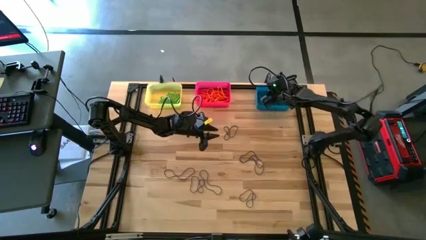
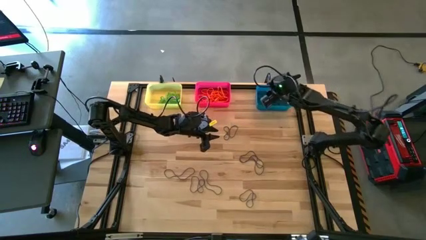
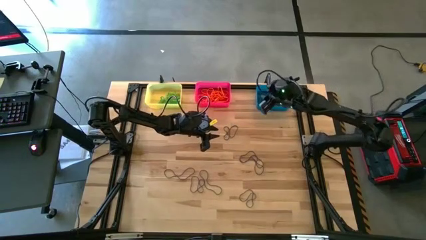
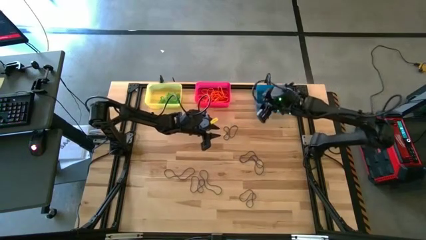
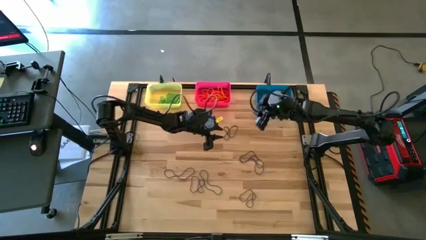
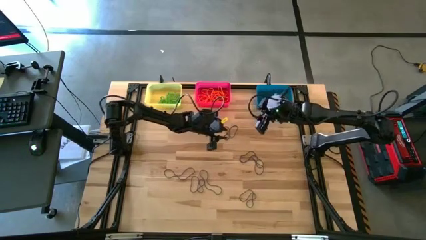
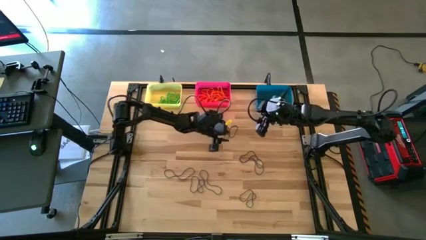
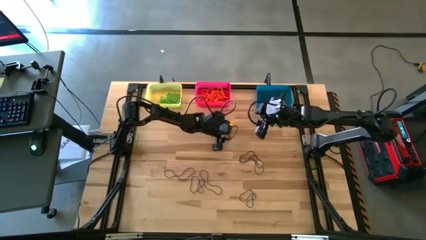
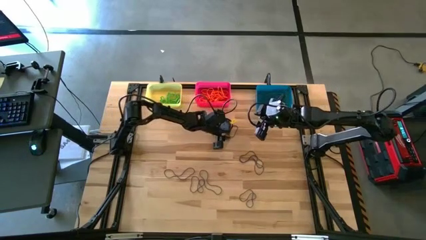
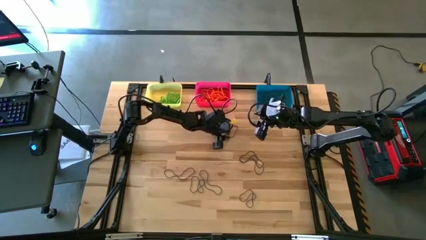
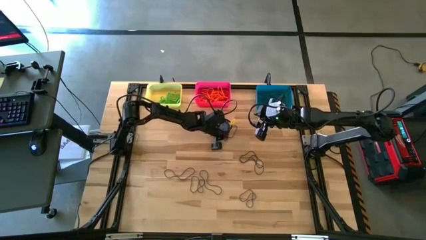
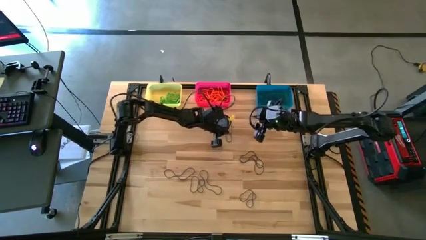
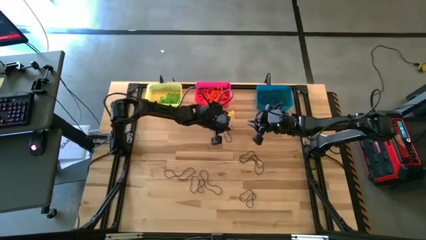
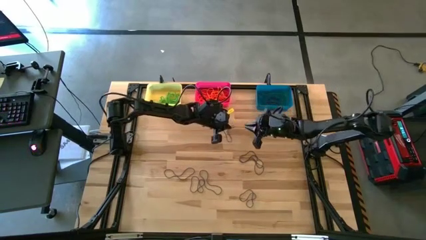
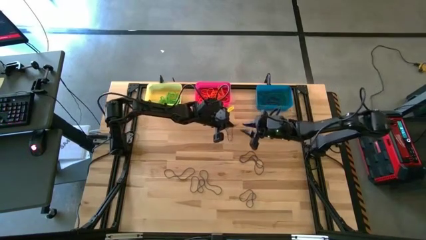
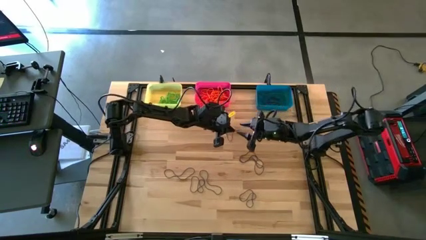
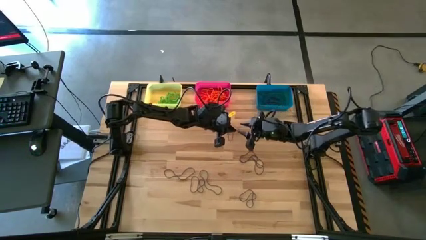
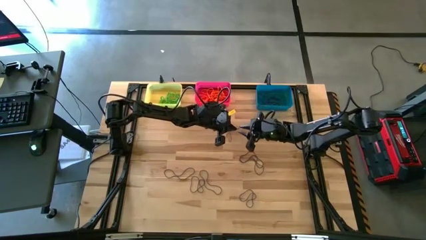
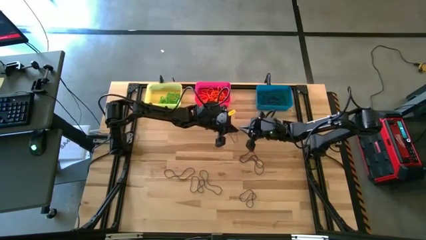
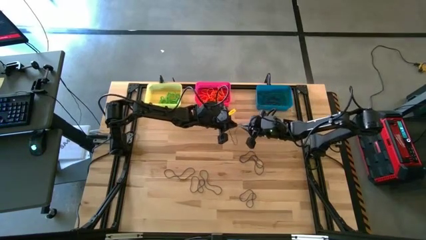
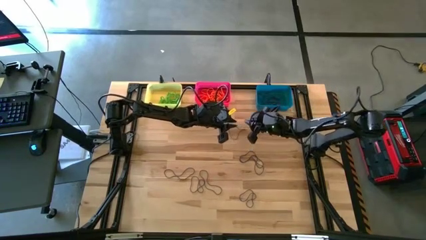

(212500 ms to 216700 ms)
Task: Sort rubber bands into baskets
Put the violet rubber band into the blue bin

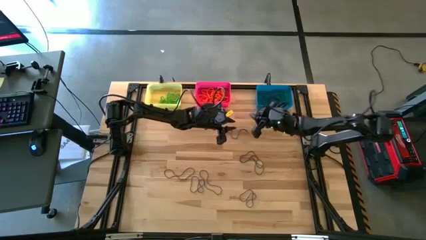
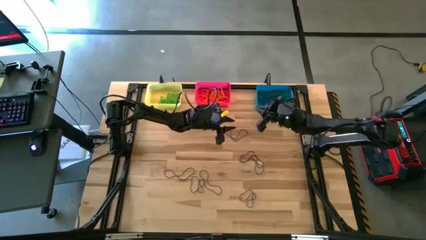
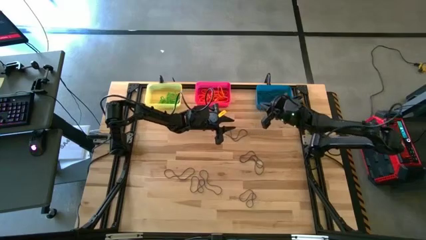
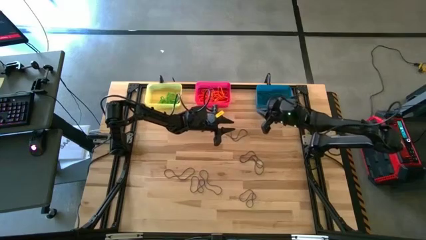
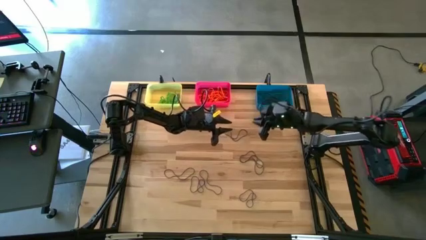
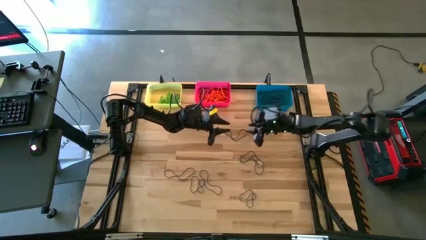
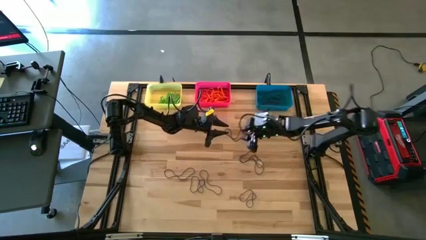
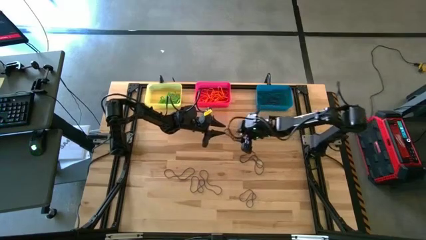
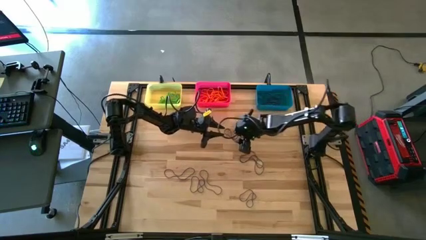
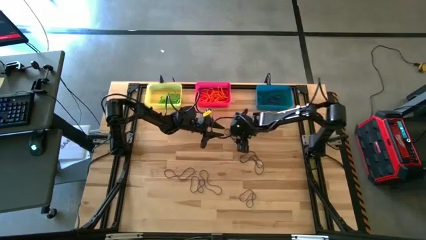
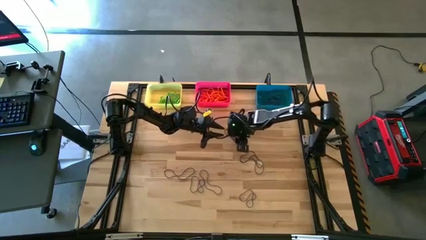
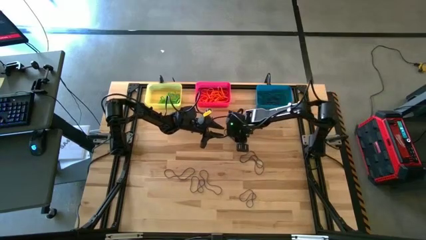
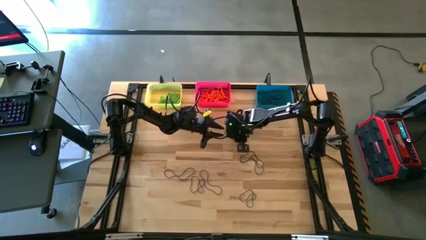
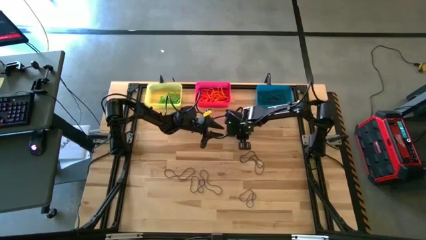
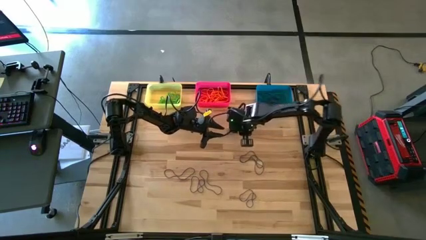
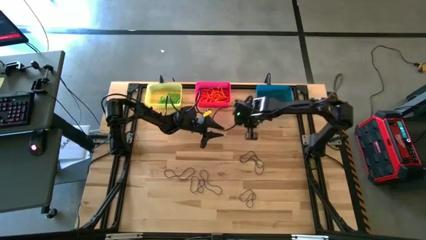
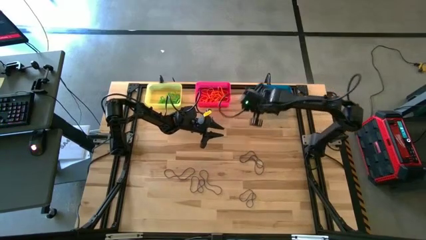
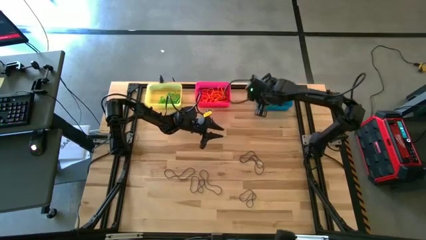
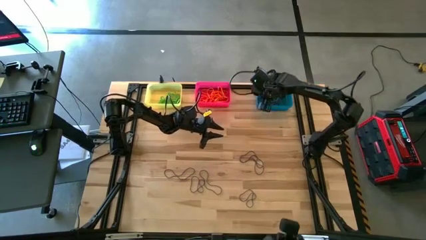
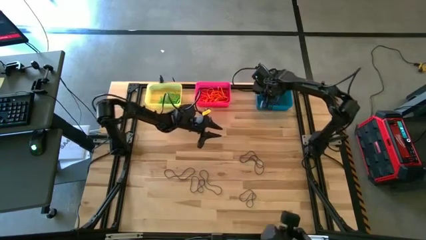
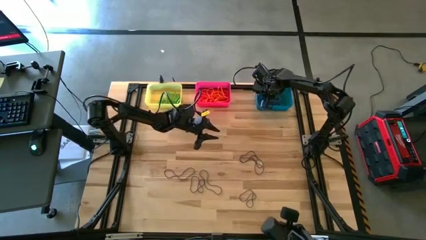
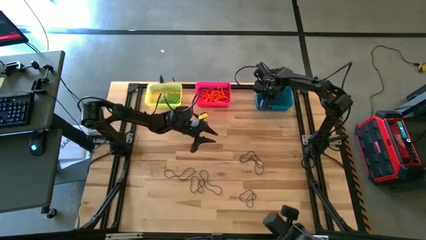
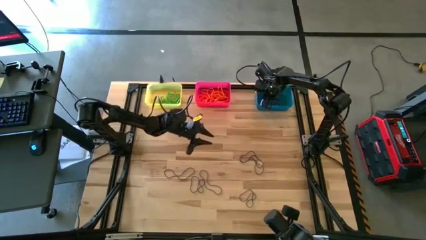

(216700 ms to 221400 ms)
Put the violet rubber band into the blue bin

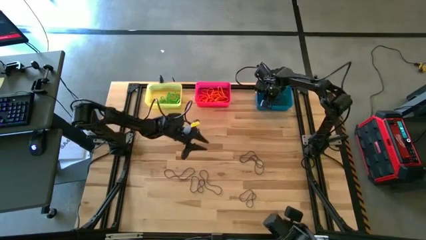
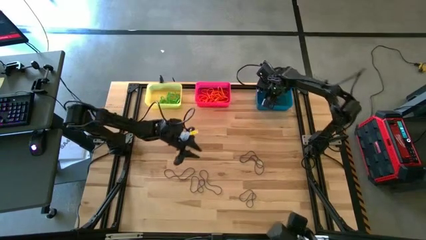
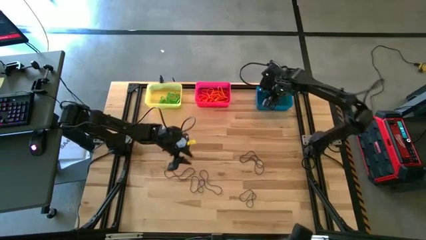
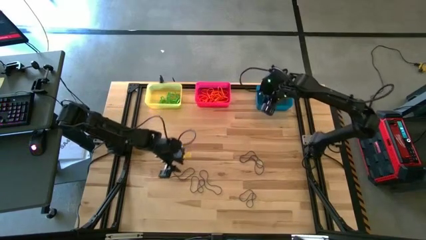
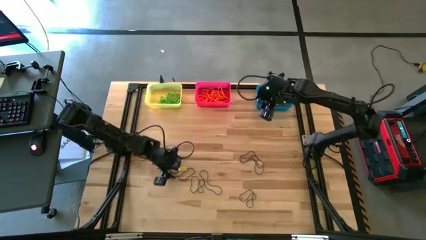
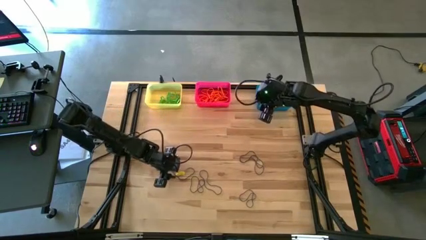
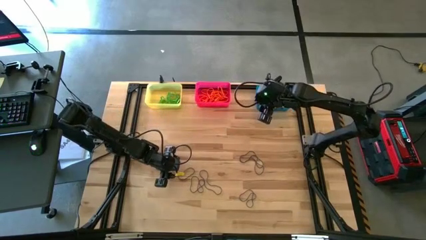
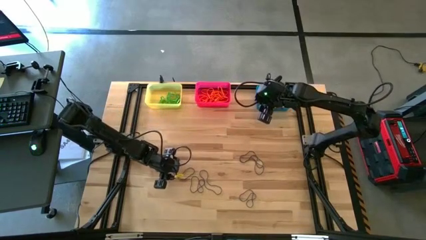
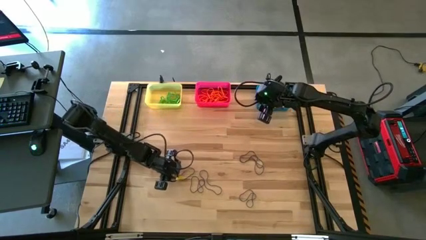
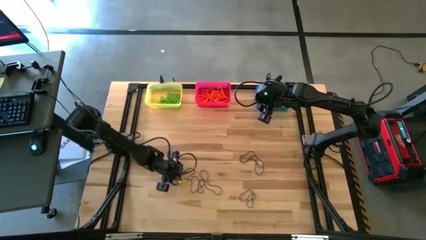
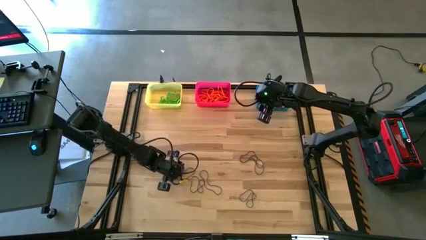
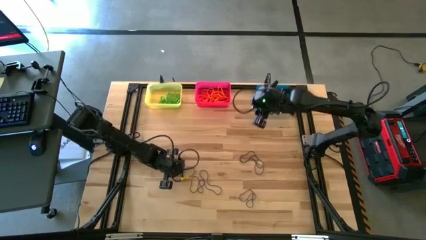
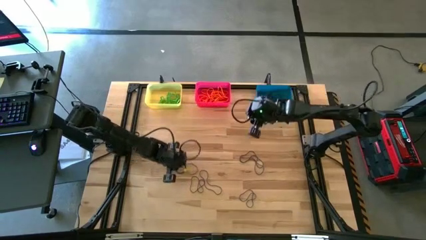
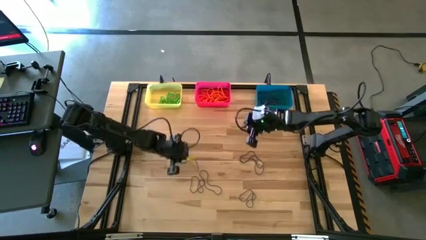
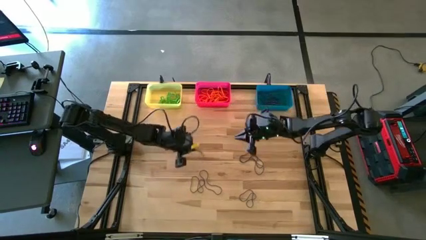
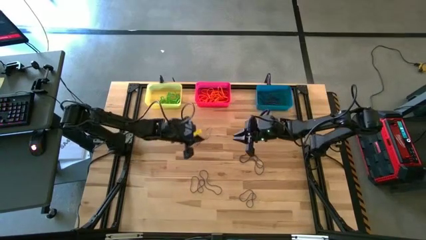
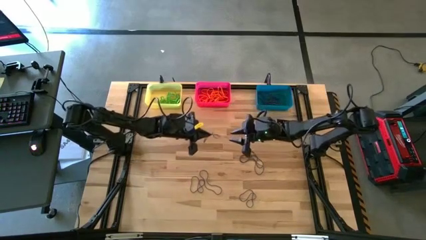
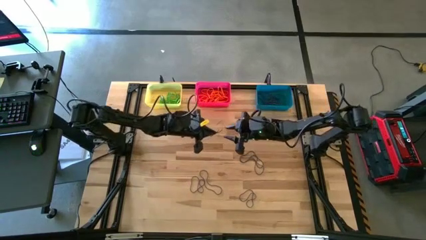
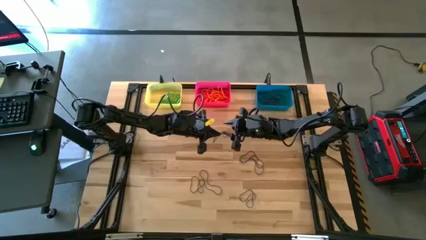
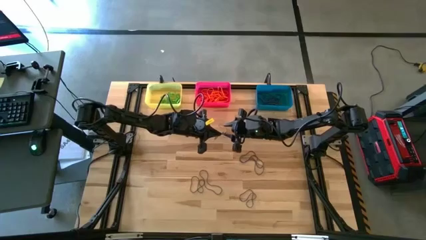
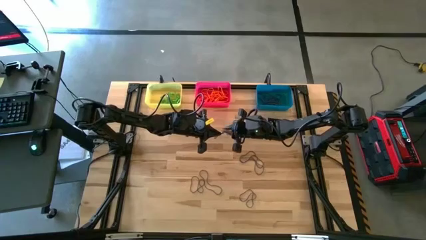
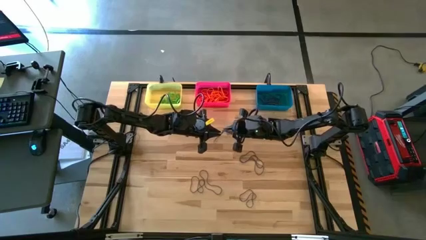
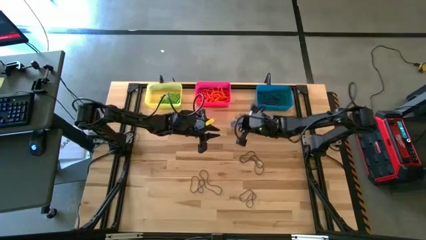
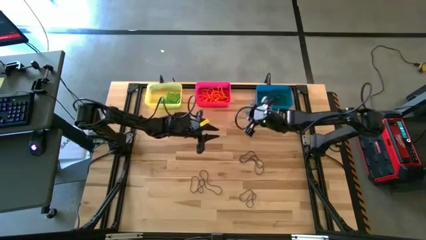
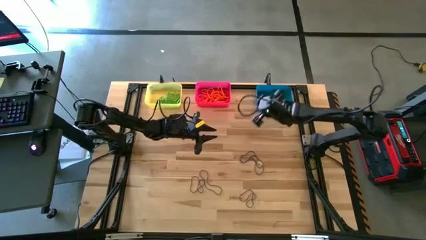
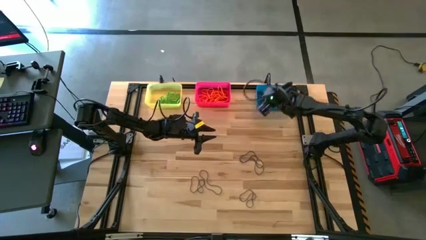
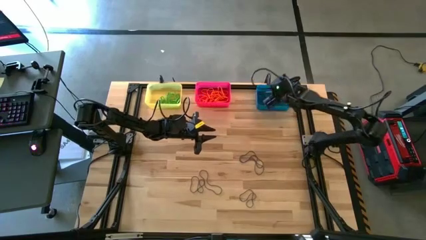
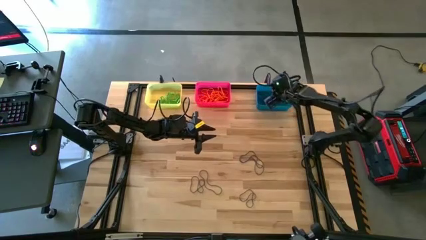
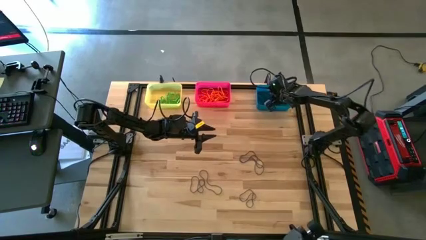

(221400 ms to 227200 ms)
Put the violet rubber band into the blue bin

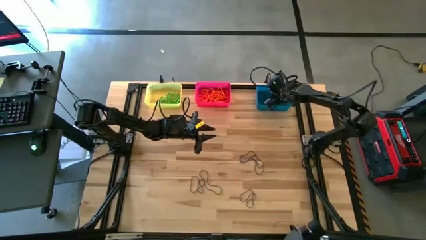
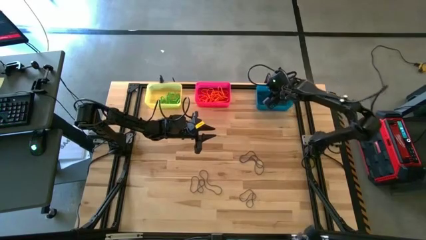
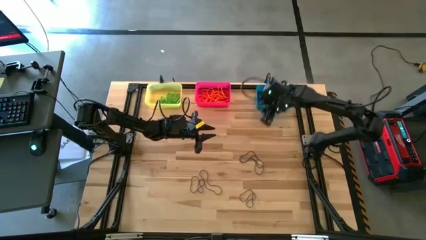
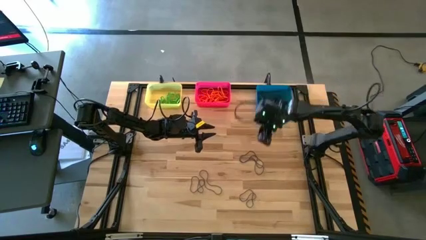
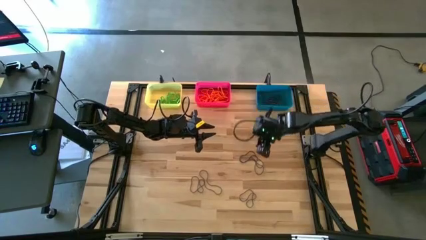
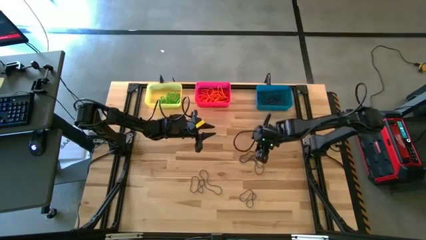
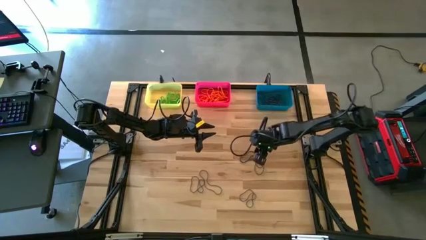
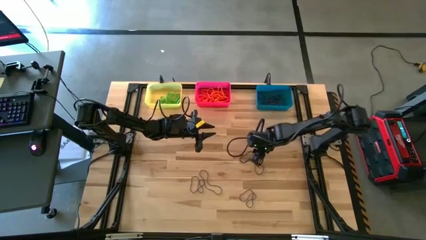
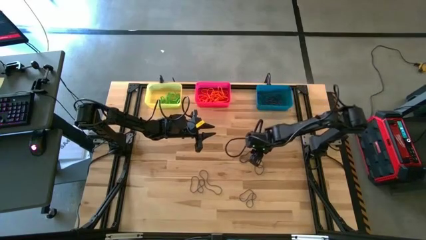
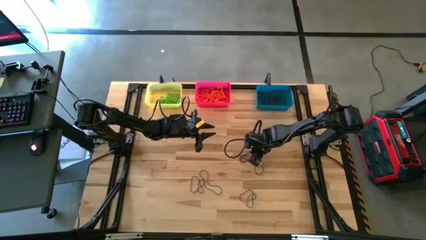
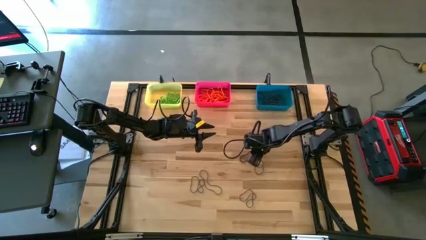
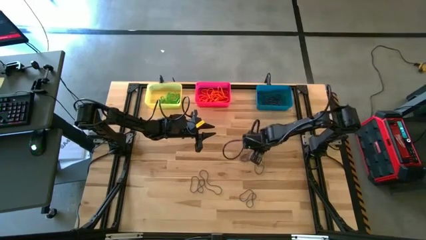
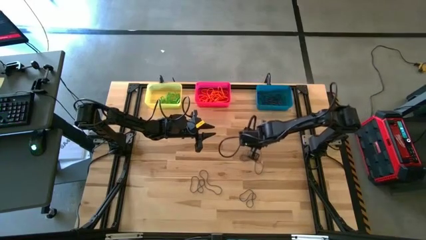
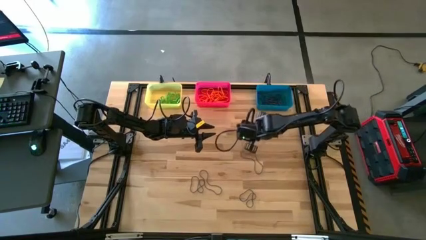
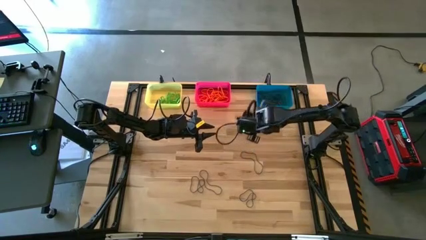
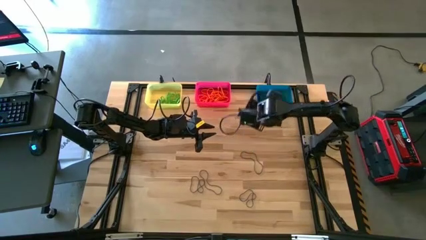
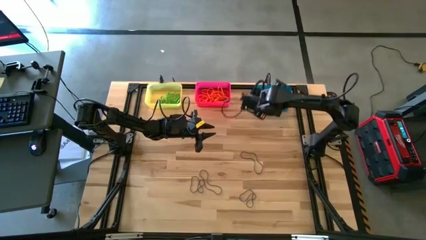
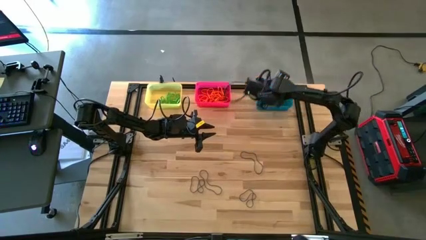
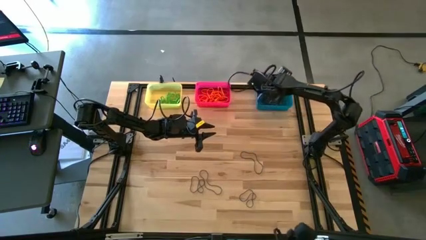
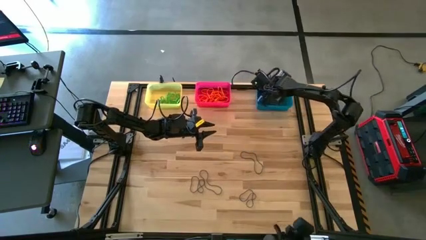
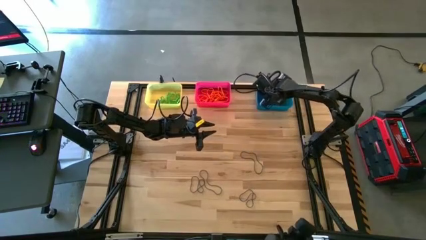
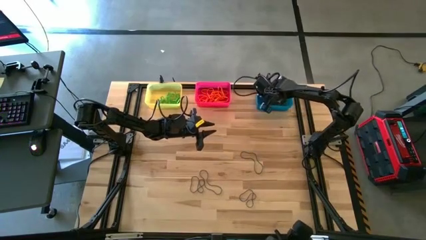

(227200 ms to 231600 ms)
Put the violet rubber band into the blue bin
